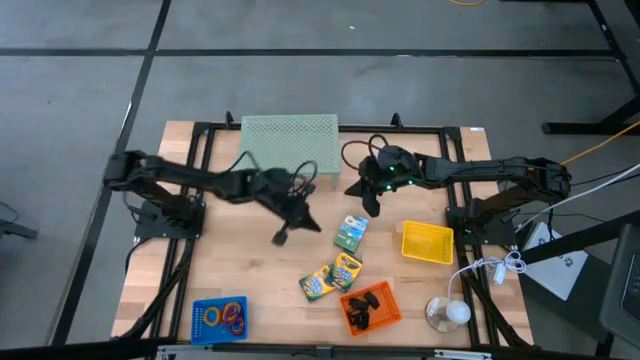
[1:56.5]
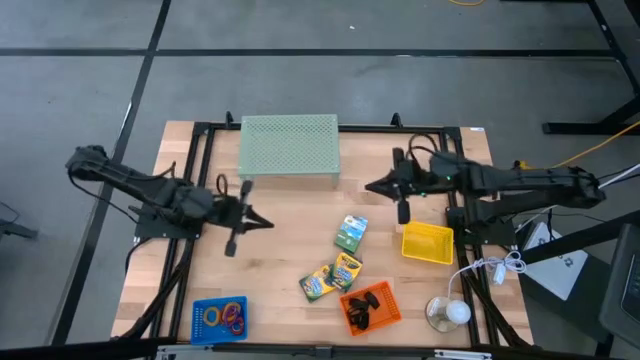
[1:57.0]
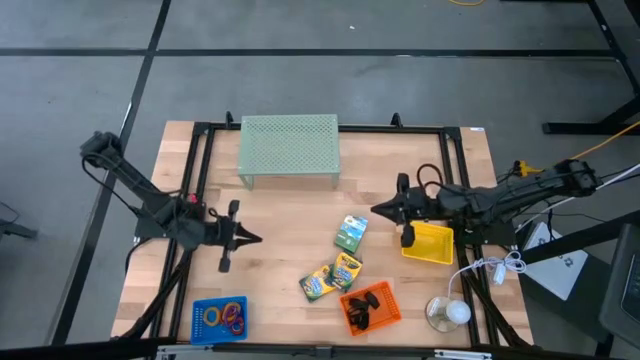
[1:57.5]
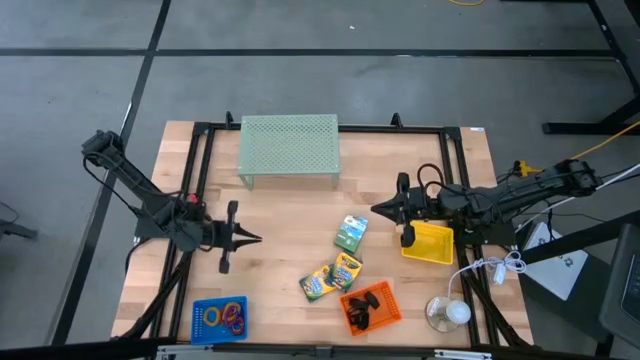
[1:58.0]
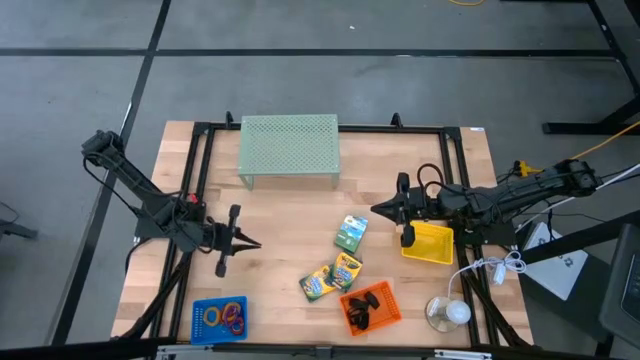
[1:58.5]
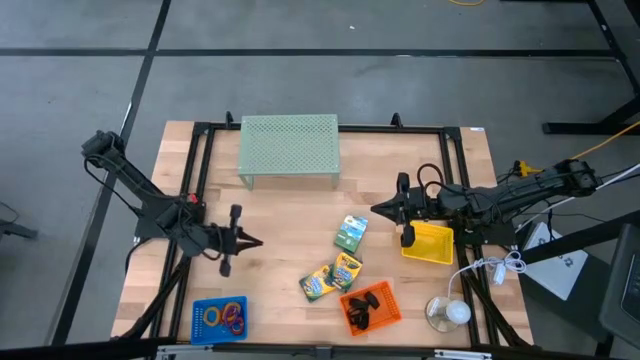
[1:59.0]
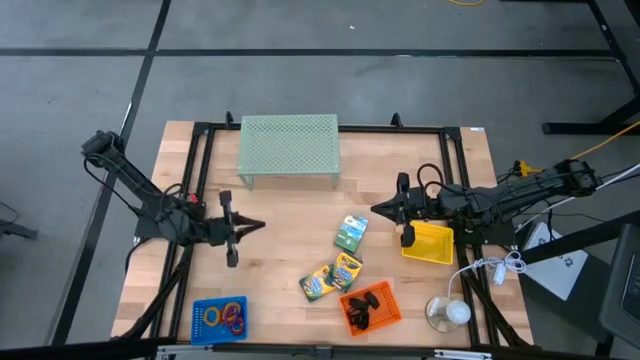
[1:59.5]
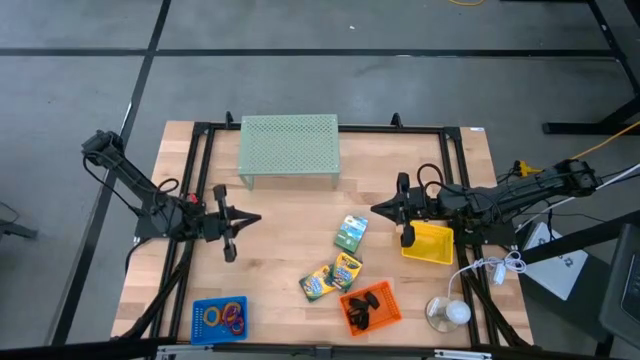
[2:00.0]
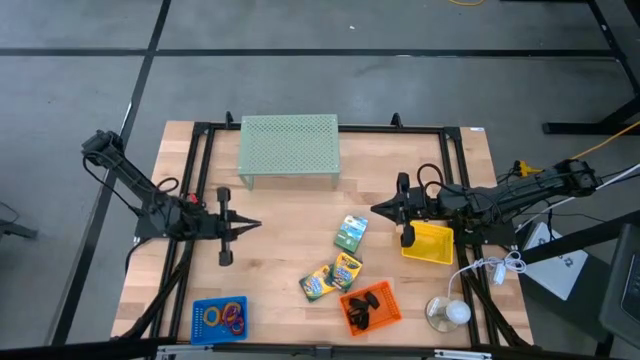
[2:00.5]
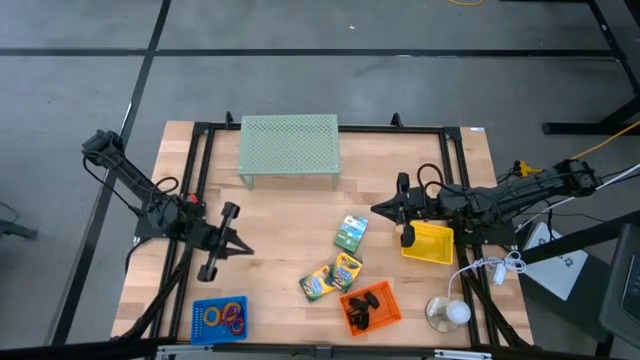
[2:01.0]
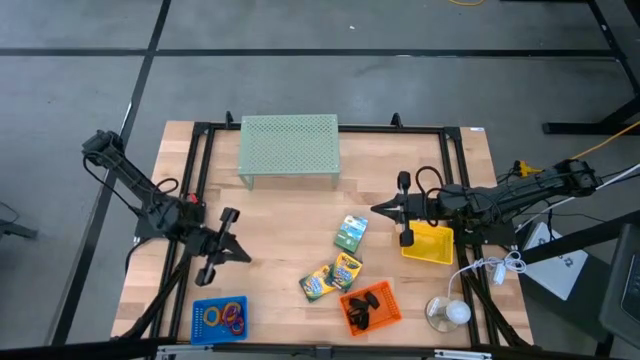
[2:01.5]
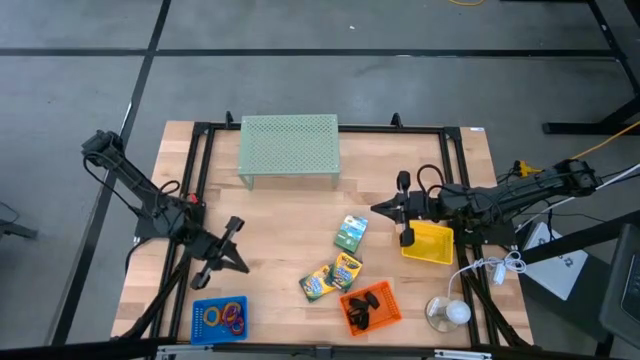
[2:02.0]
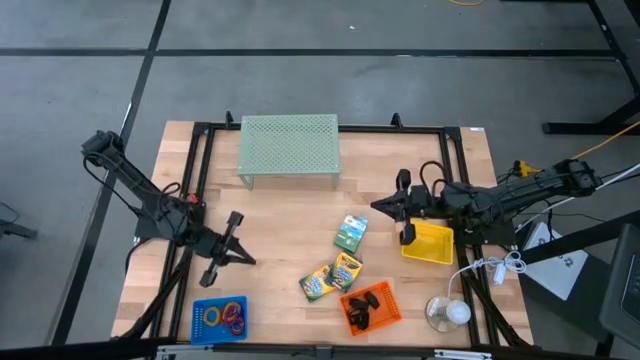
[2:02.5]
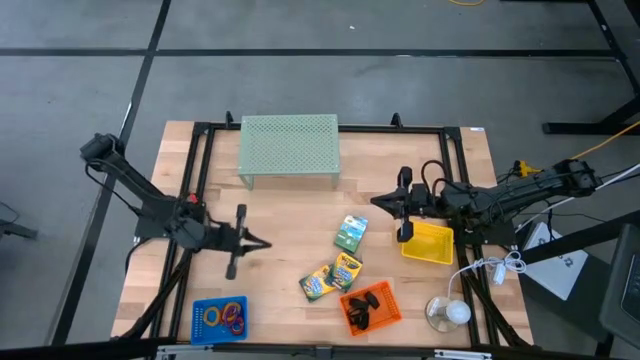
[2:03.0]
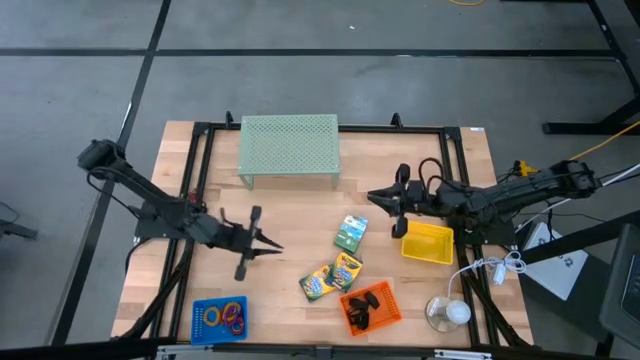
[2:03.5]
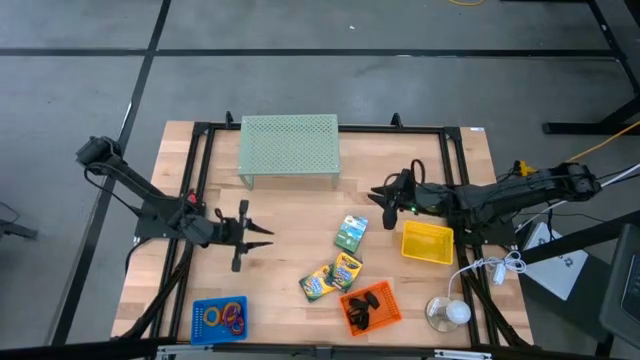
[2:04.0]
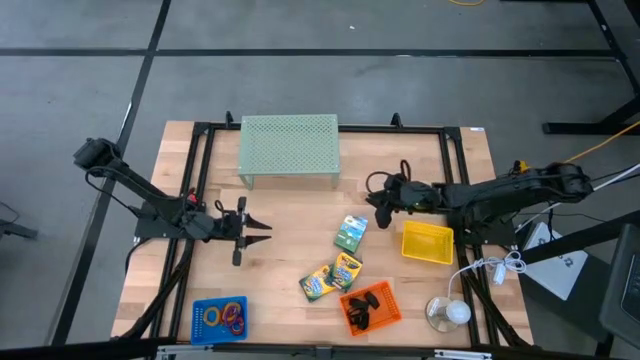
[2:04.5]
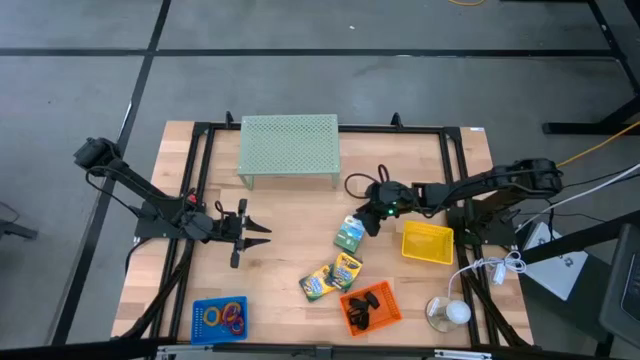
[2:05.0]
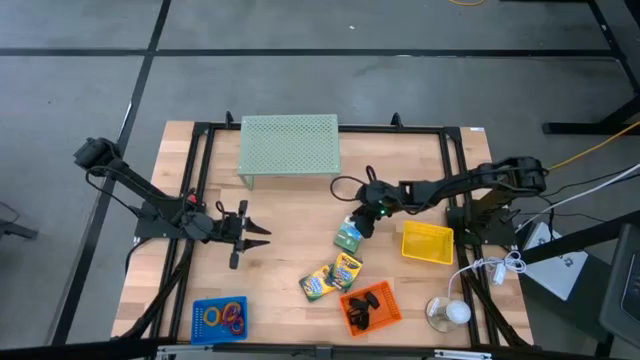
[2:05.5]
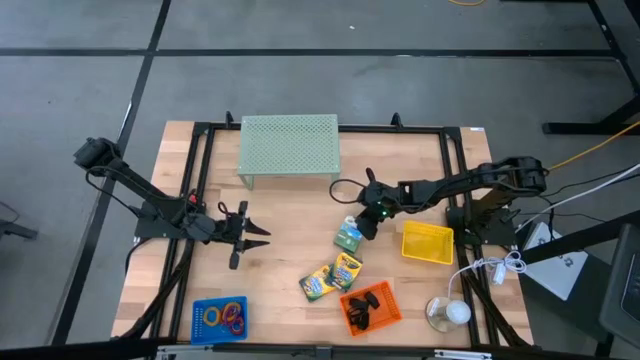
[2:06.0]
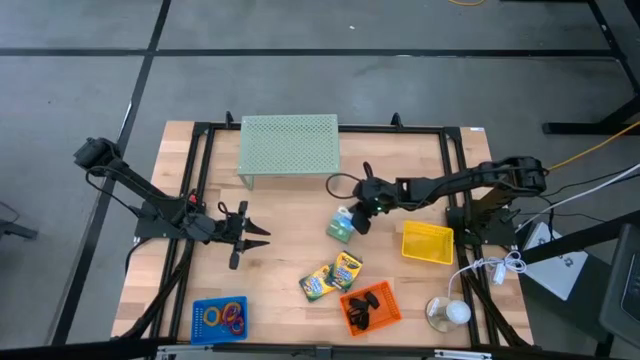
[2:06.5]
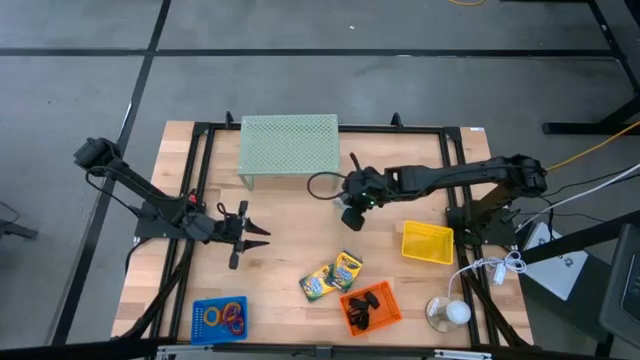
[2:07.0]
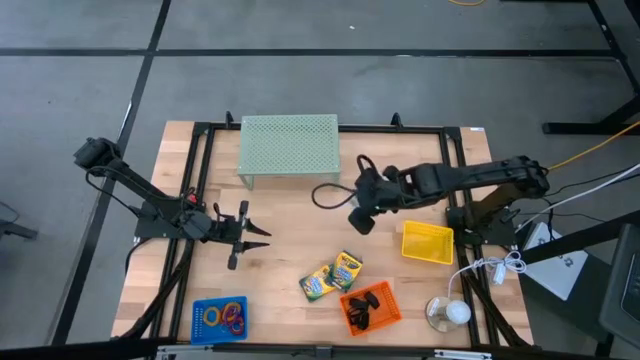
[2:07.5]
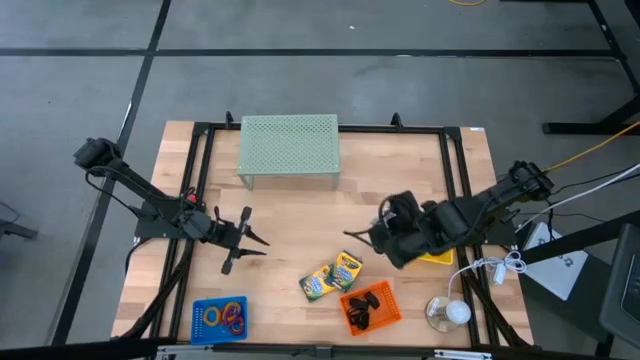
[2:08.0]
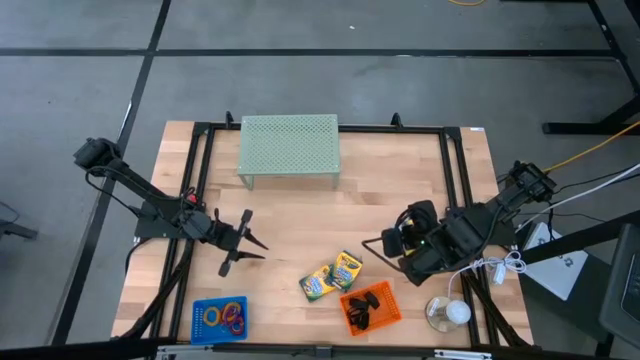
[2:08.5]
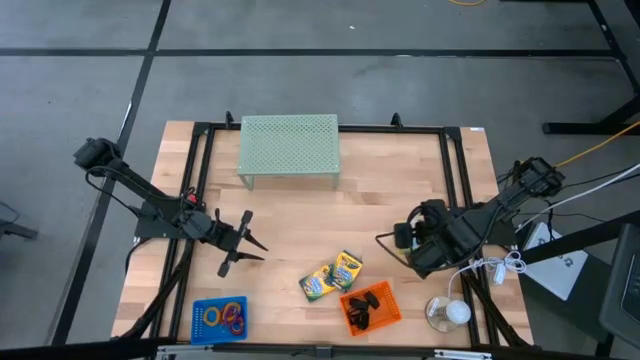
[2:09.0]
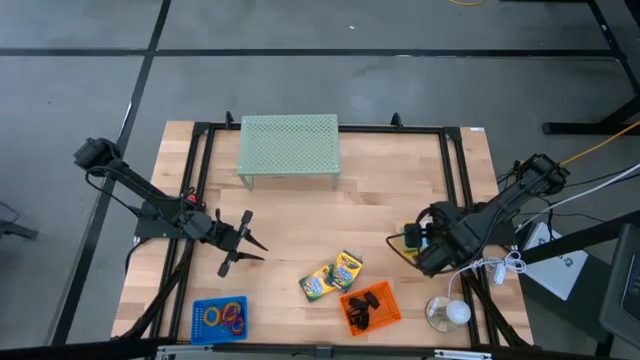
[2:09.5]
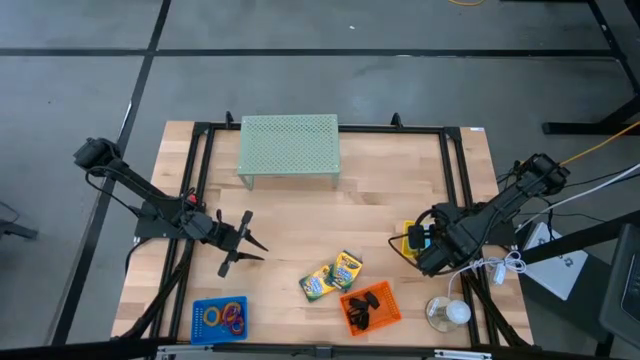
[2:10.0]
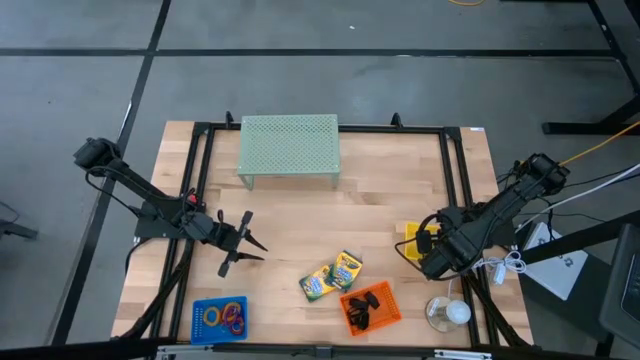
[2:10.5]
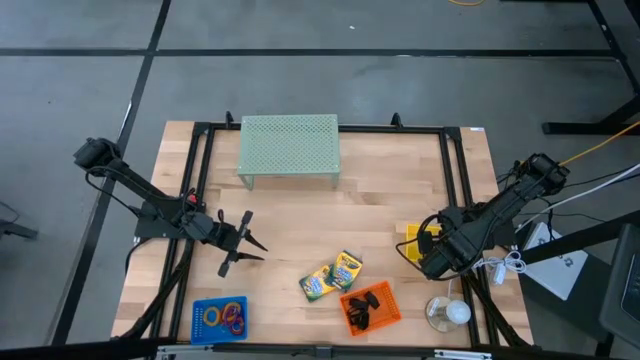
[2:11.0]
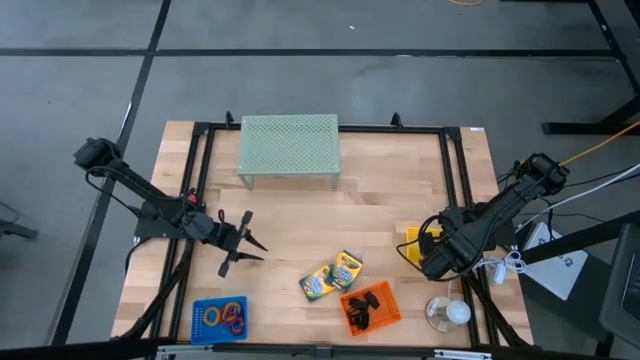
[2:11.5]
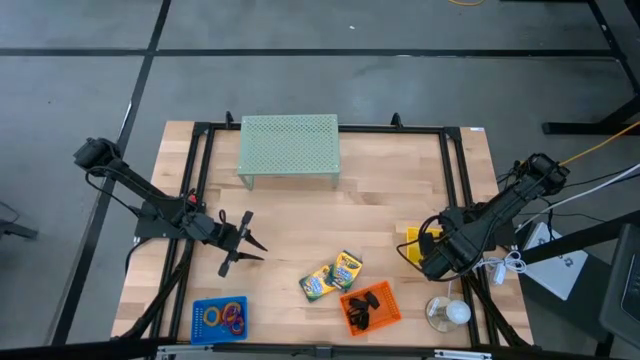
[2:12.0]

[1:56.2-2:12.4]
Task: Pick & Place Office Desk Supplies
Put the box of crayons into the yellow bin

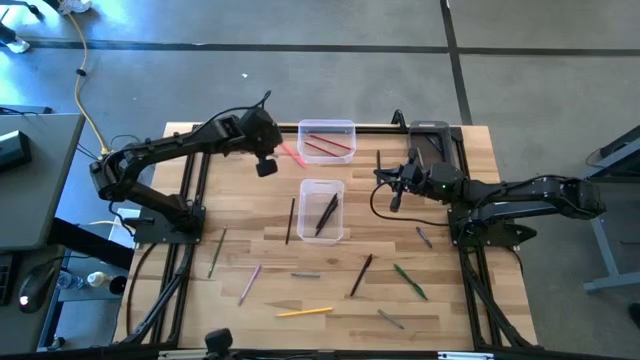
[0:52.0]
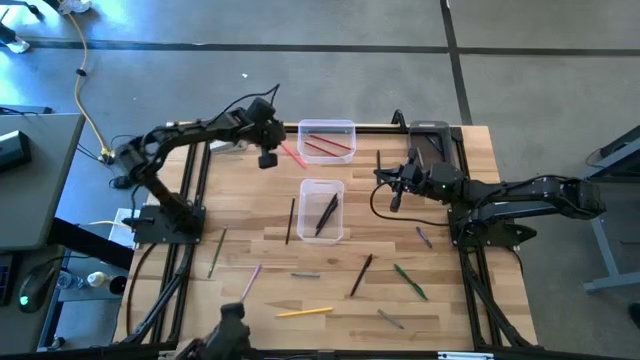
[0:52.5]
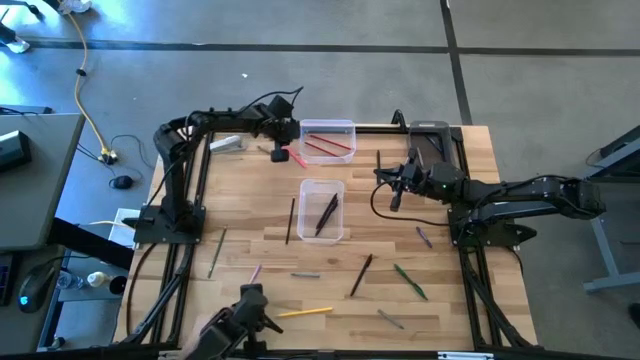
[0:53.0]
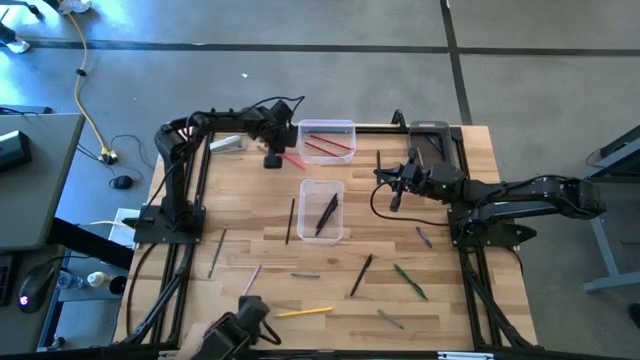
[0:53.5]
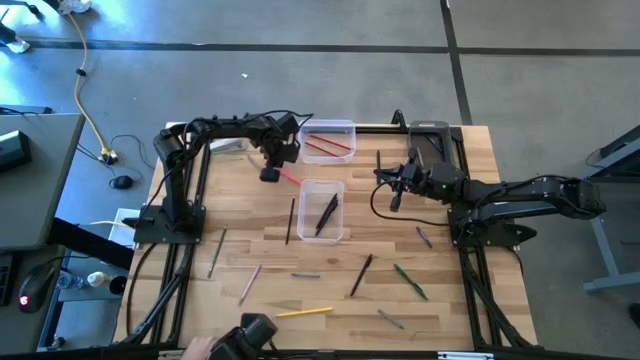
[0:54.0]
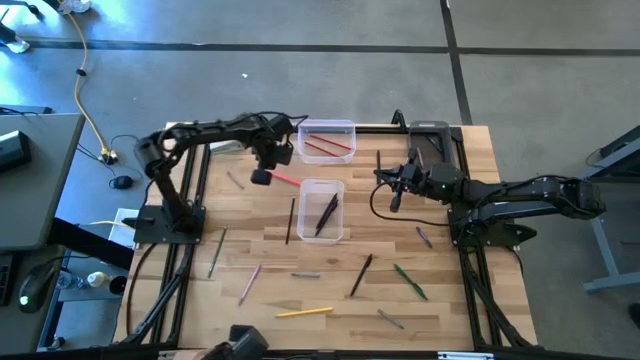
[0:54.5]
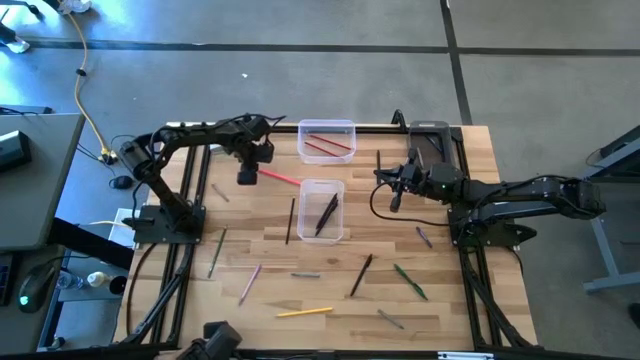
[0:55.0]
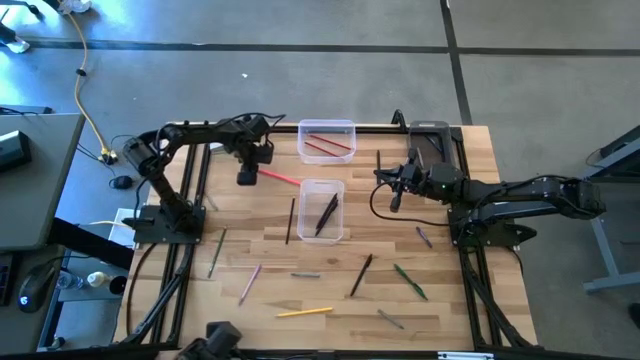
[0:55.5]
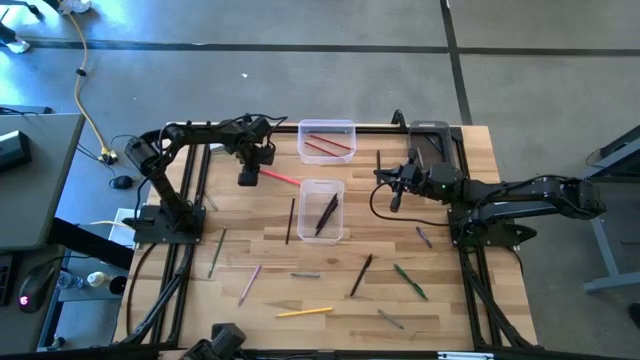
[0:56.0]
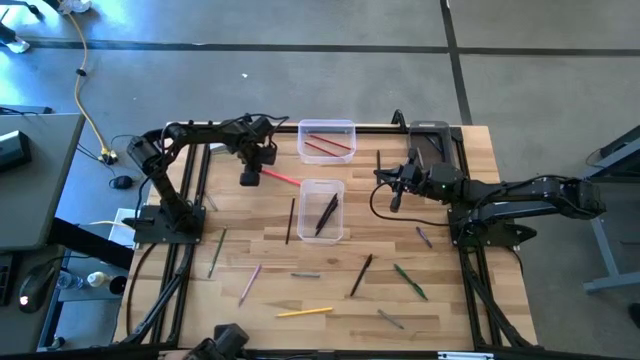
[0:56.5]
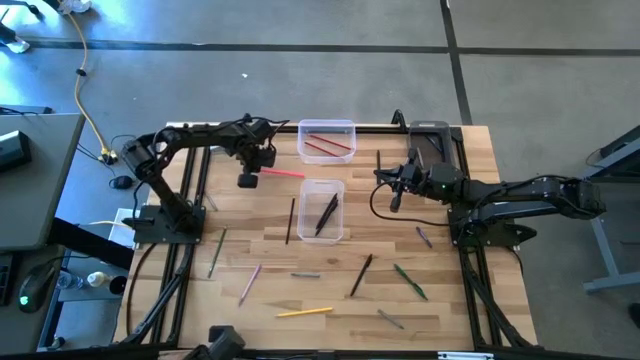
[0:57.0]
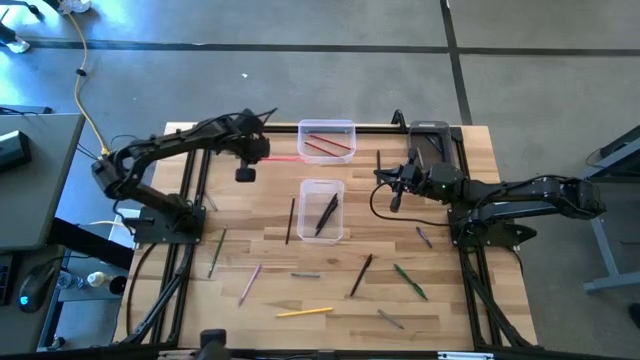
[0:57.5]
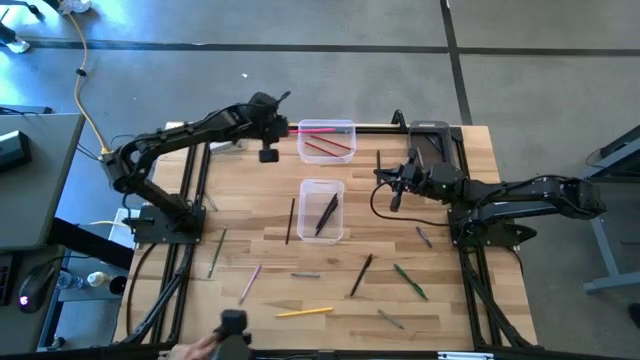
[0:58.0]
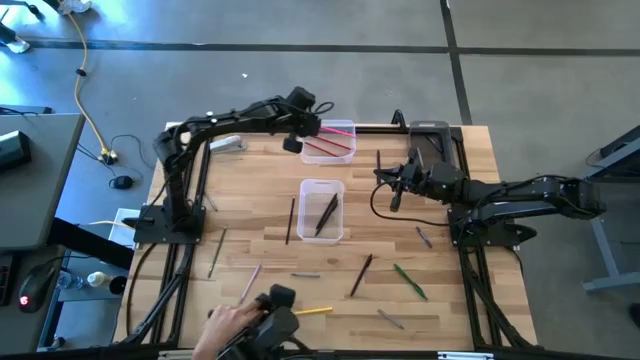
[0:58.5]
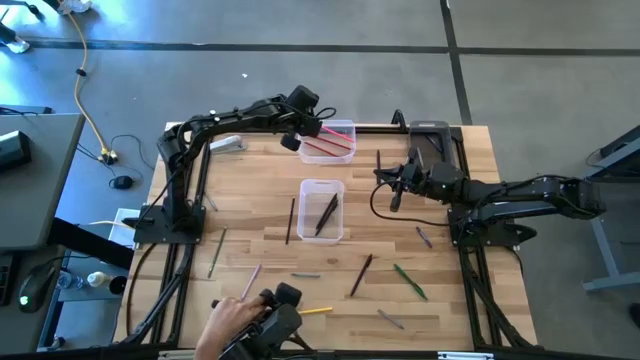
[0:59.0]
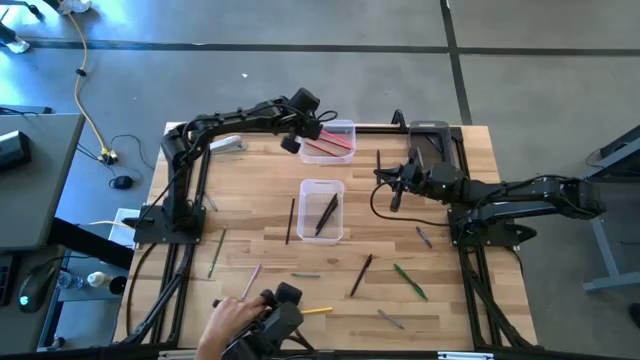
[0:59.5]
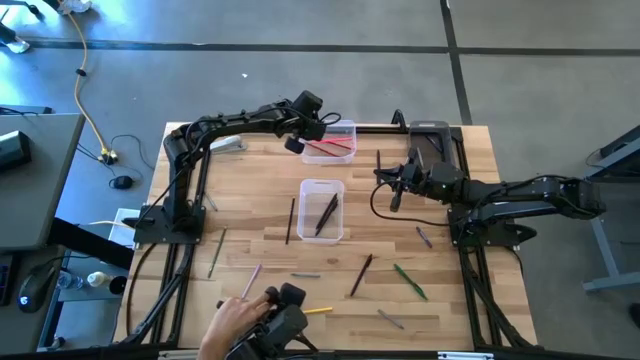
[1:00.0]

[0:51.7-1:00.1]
Task: Sort crayons/erasers/pens/pencils in bins
Put the pink color pencil into the top transparent bin
